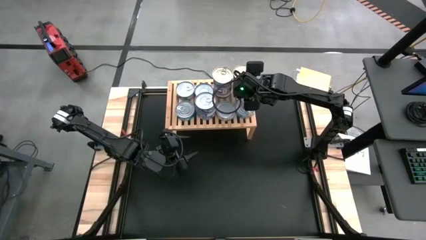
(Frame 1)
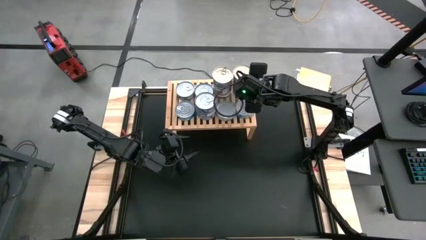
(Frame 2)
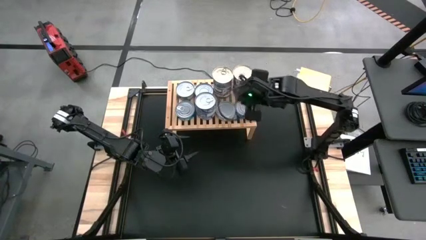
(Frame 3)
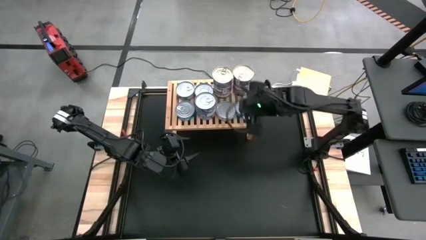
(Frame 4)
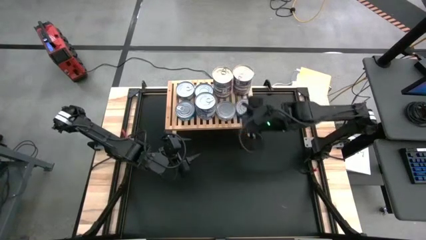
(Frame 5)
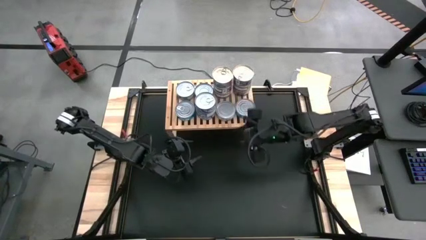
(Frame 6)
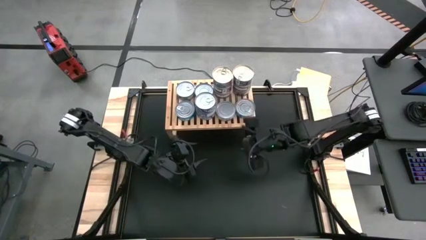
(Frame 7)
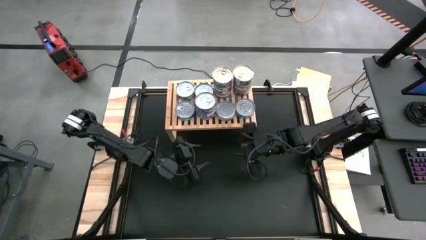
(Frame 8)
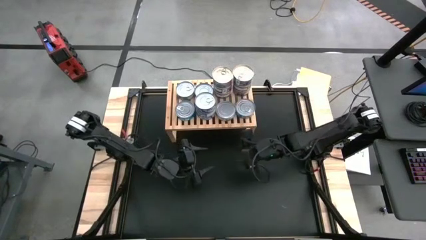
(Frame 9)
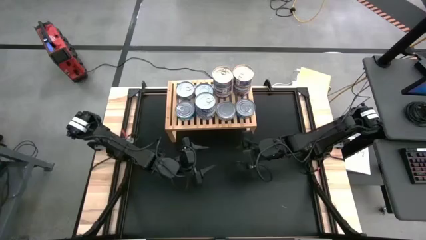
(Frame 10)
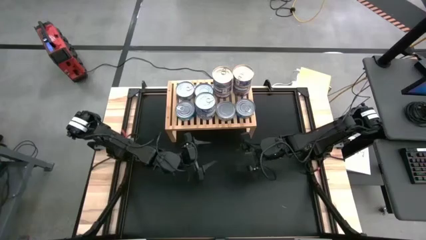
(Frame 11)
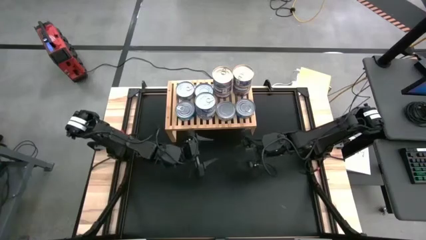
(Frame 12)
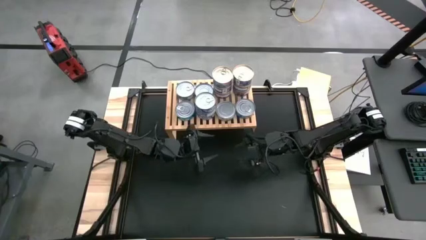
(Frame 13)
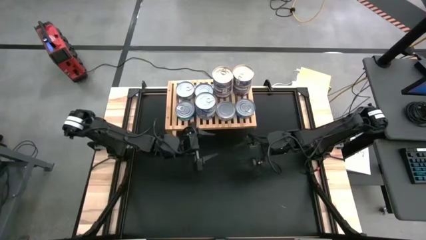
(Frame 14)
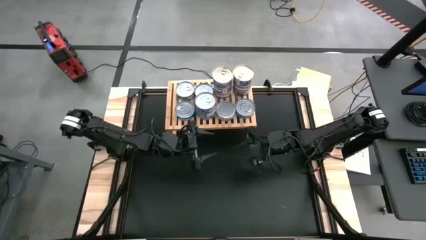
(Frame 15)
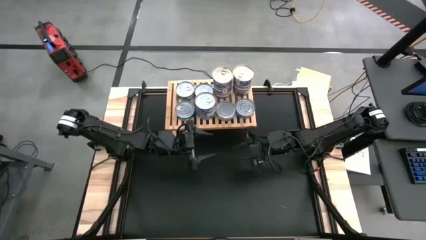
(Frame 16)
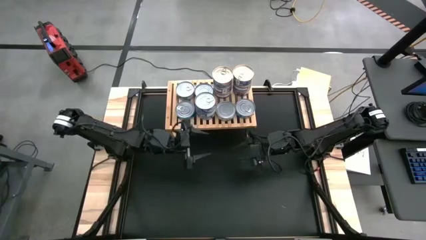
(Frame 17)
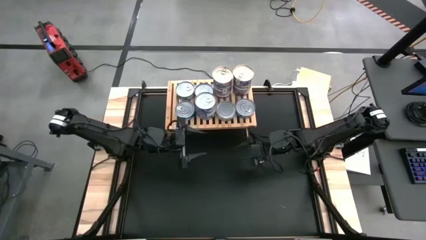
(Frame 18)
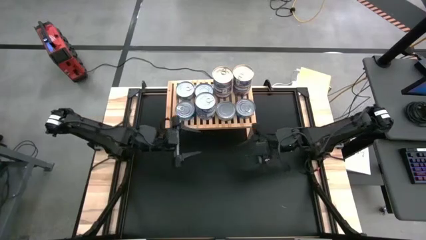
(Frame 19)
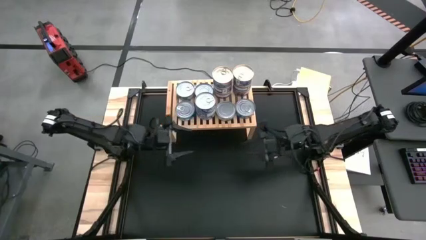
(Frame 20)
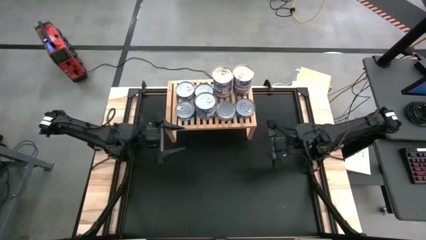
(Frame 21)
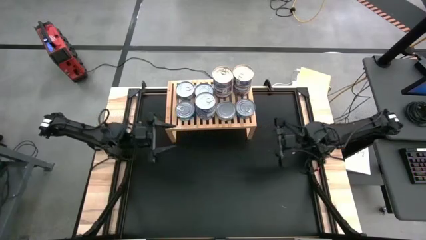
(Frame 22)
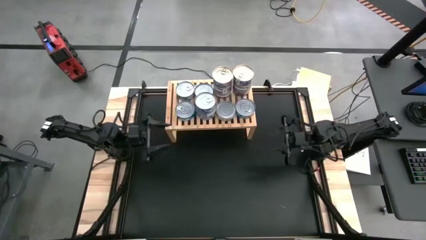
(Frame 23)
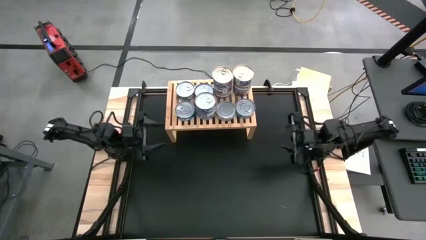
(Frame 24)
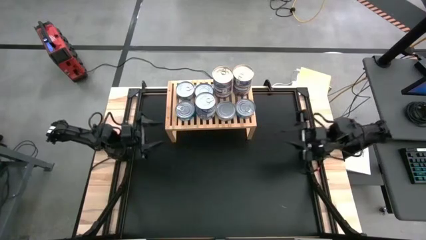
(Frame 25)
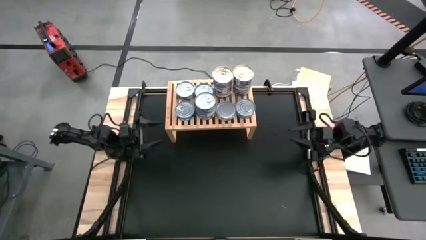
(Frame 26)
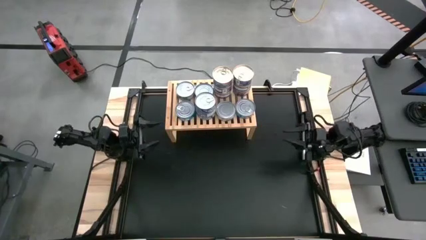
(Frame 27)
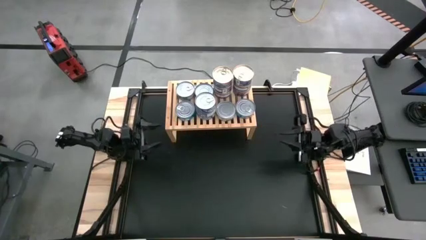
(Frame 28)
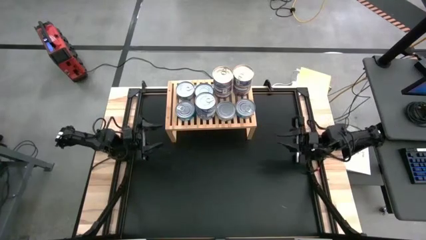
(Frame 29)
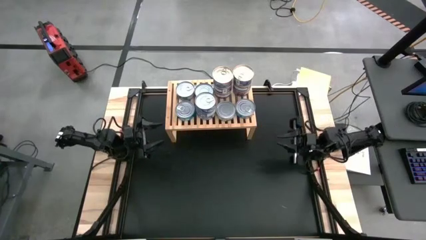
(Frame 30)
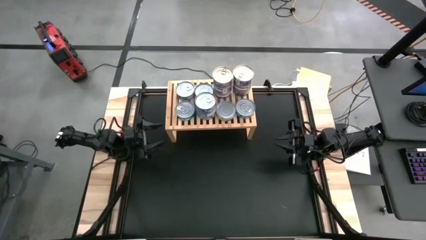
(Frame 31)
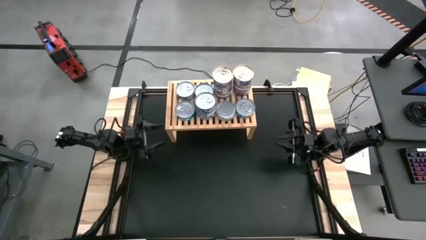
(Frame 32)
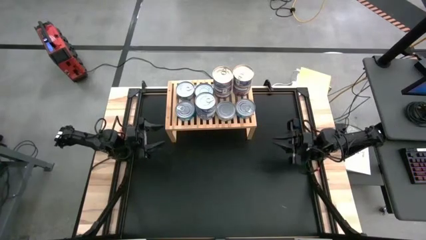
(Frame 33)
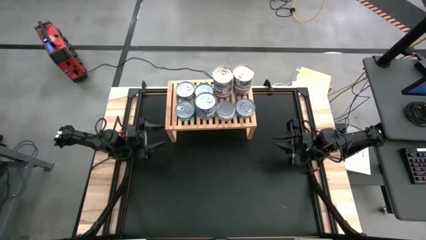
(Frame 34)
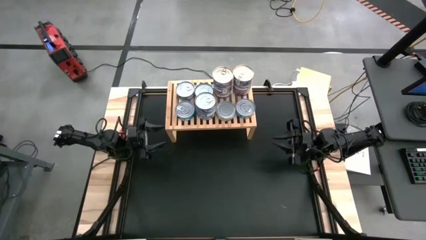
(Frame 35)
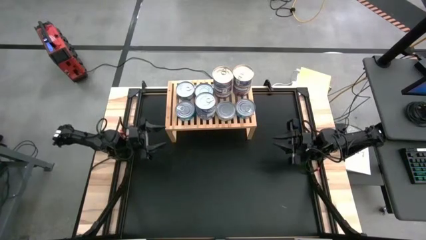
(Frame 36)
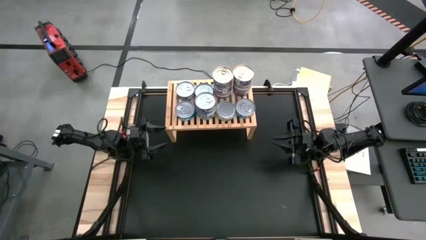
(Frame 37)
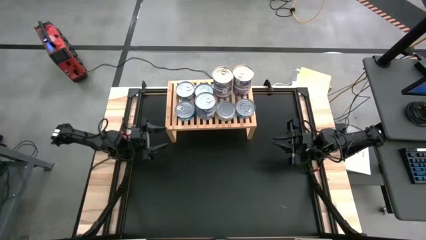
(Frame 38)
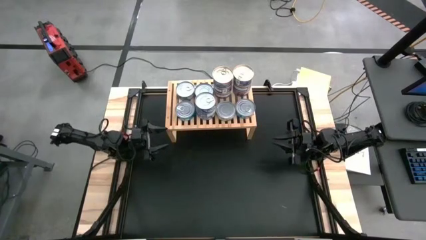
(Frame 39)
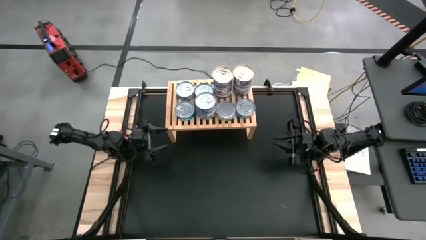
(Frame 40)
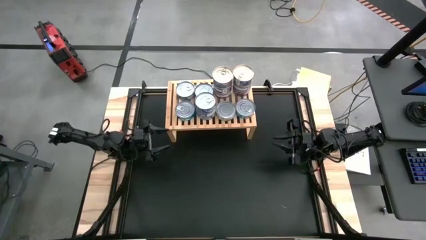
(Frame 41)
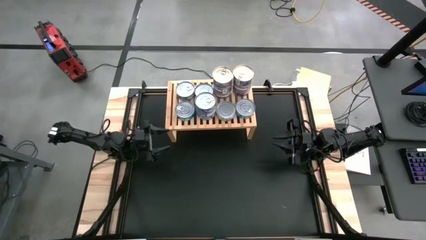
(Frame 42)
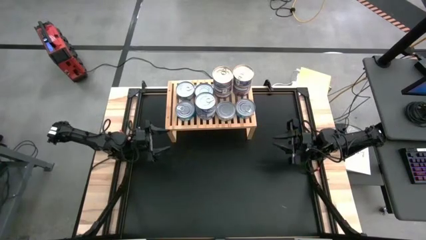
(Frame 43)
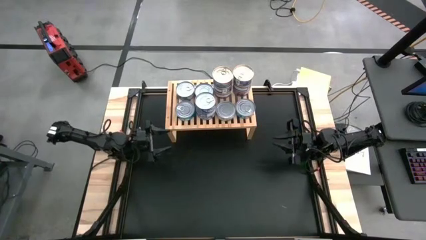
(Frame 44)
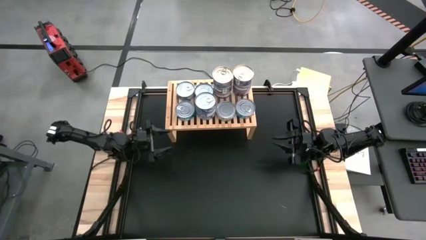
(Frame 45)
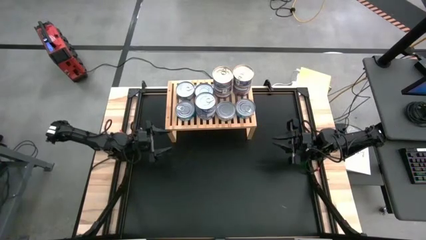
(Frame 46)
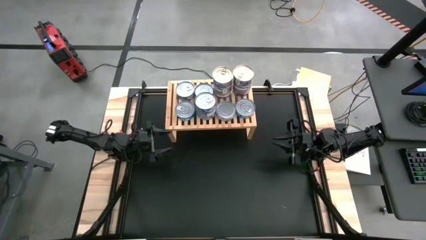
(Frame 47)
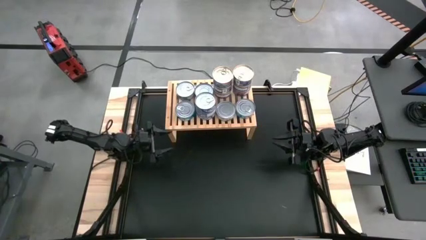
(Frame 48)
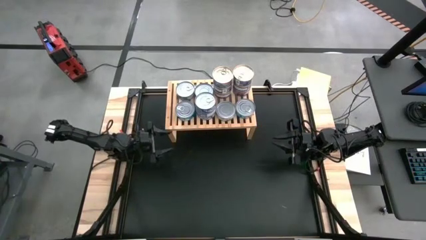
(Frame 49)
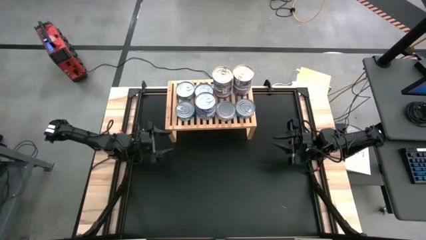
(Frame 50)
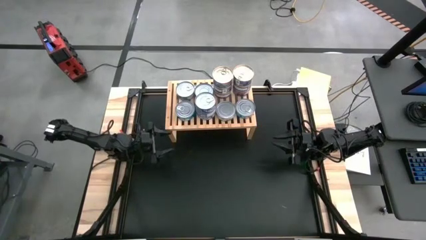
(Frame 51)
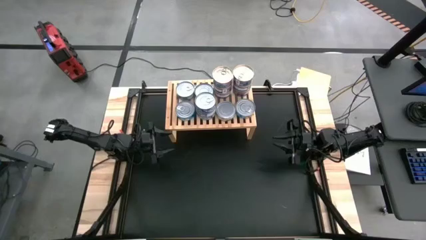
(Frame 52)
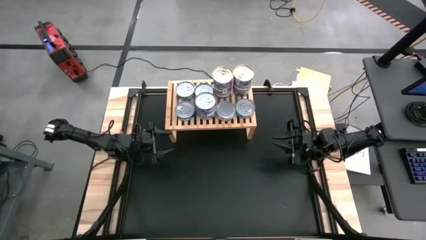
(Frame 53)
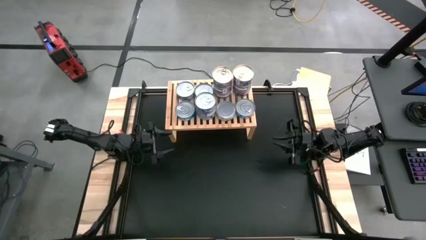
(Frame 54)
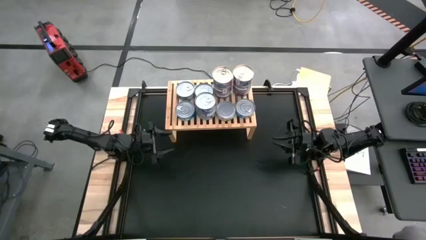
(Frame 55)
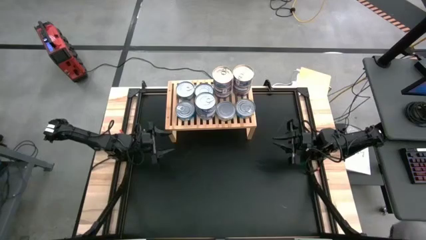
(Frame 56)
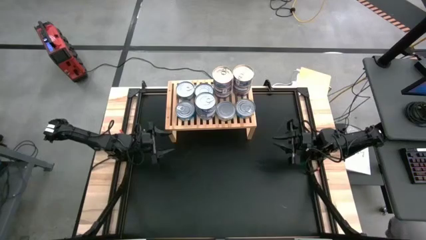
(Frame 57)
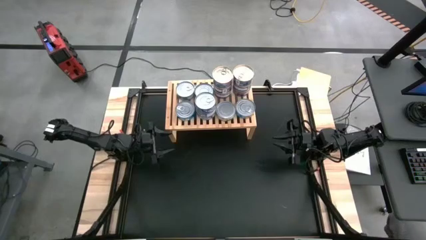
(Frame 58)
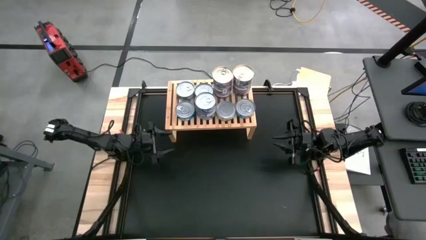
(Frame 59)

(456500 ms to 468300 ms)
Task: Stack canned seafood by type on shelf
Return to Home Position

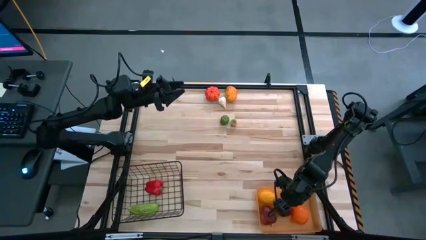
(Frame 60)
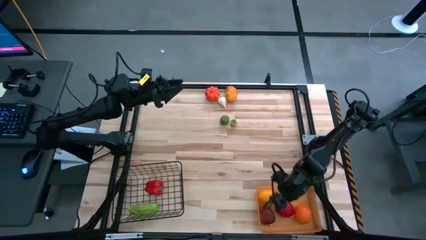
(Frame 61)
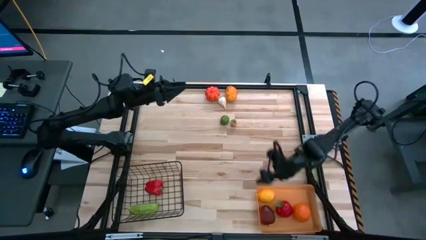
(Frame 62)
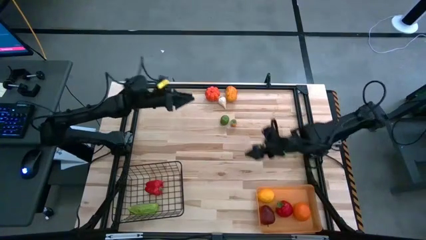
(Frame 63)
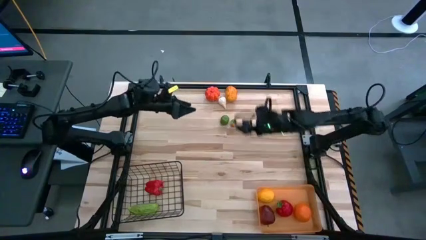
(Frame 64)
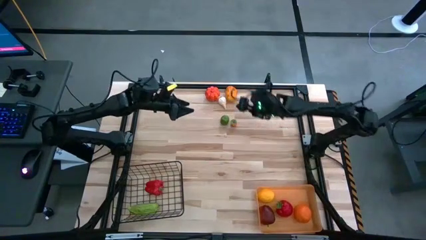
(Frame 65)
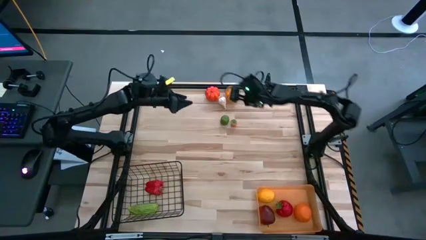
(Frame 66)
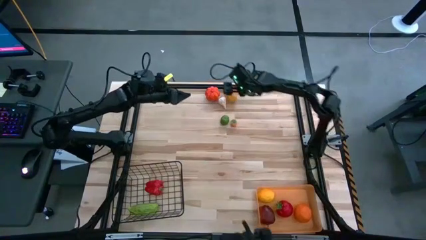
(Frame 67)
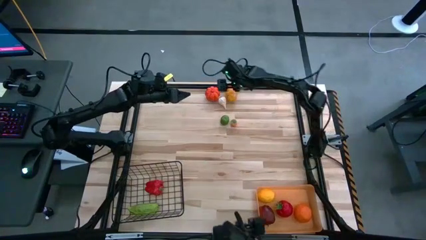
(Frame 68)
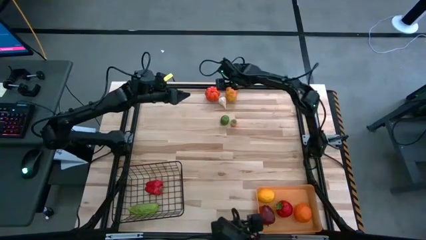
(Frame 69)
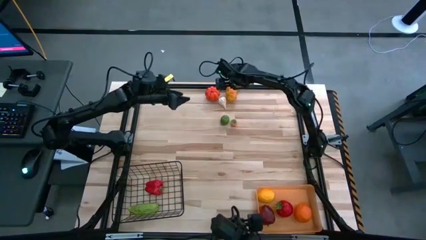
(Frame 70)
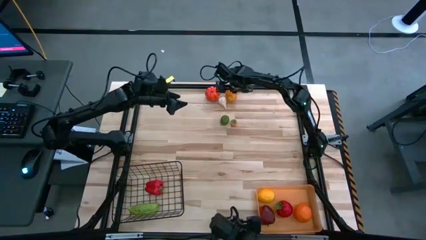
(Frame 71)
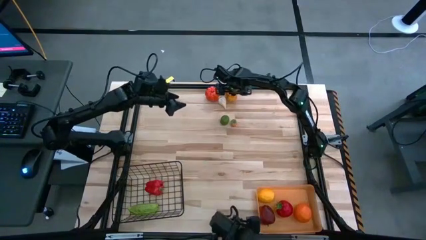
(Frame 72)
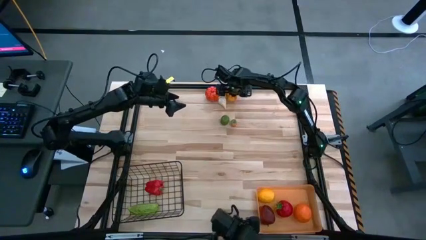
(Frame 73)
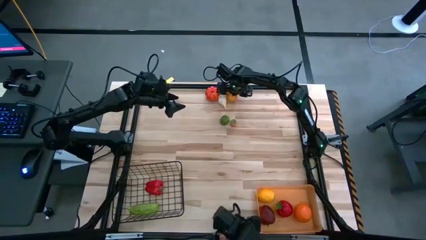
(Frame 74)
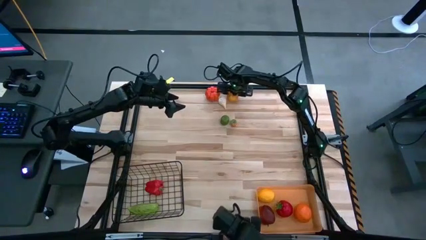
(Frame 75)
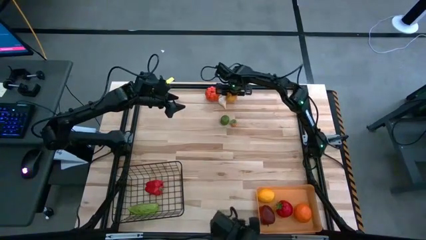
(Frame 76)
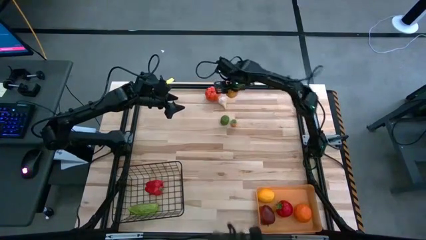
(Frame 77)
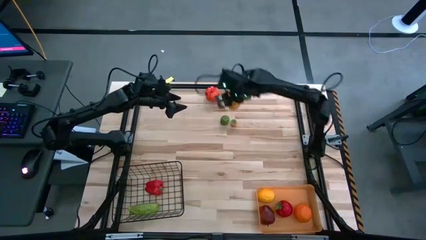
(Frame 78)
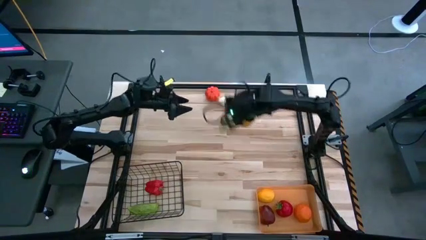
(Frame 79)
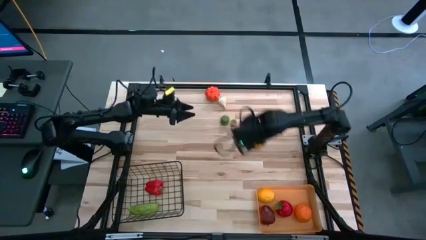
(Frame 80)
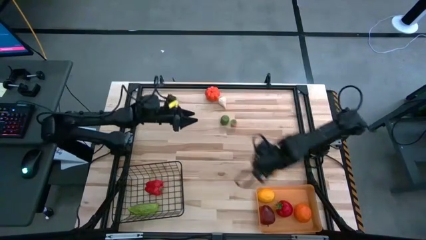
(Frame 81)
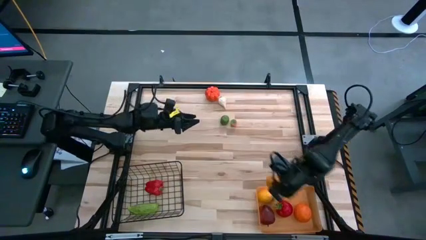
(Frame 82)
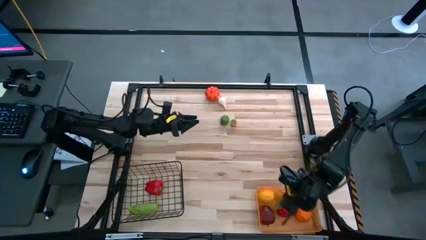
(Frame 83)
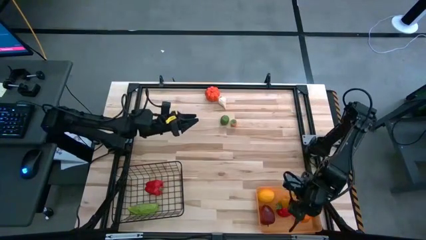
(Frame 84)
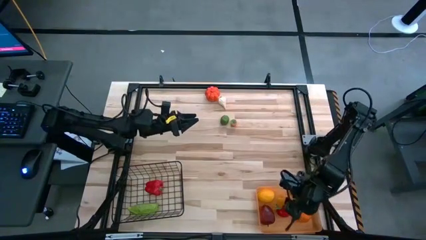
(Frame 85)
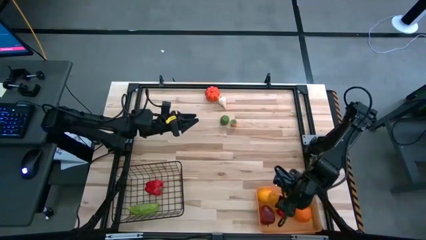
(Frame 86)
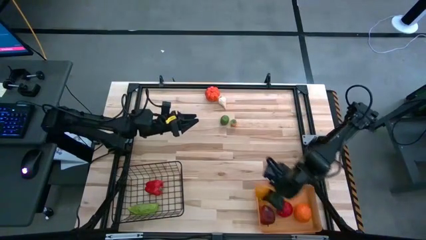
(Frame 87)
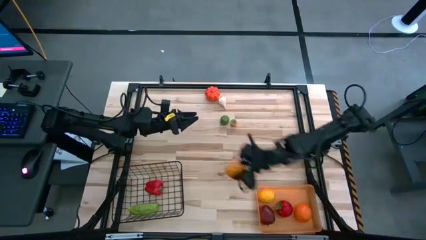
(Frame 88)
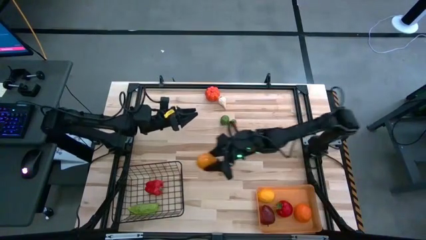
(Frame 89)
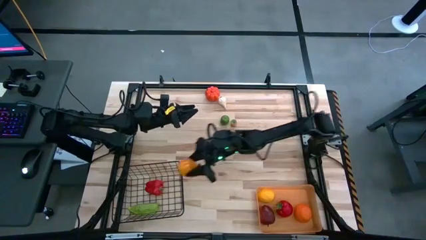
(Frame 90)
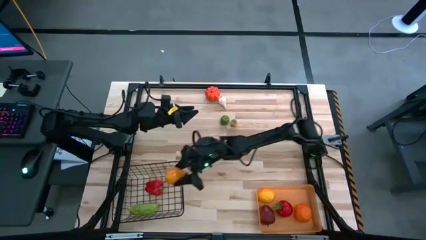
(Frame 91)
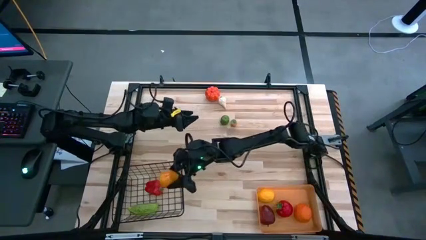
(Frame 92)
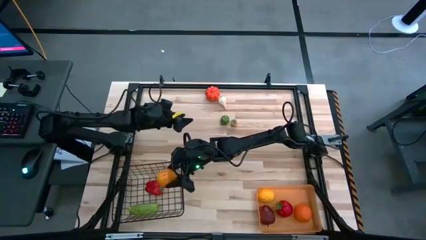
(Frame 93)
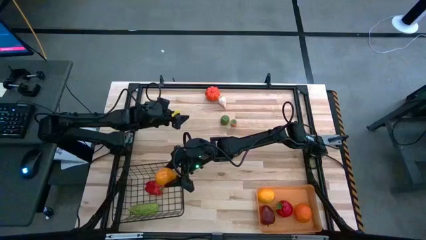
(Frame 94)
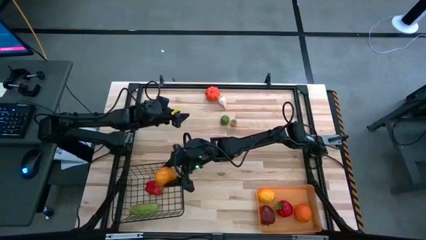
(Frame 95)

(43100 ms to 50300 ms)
Task: Sort produce into baskets
Put the brown potato into the black wire basket
